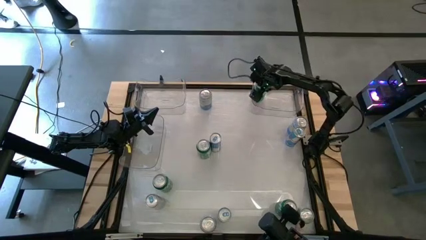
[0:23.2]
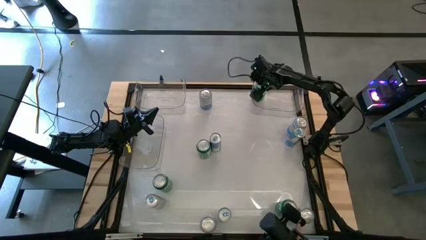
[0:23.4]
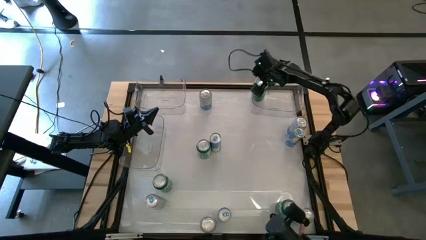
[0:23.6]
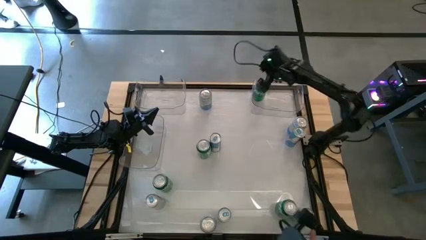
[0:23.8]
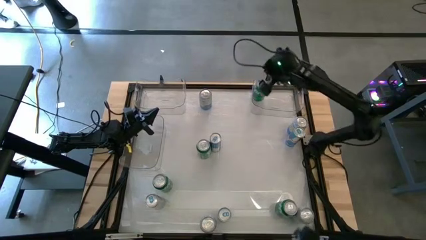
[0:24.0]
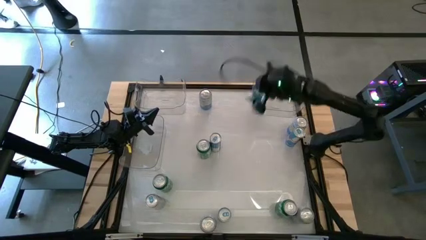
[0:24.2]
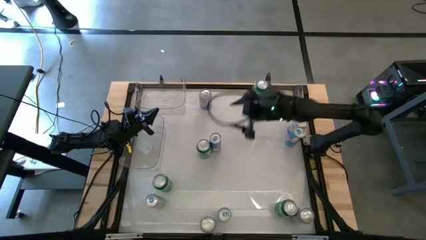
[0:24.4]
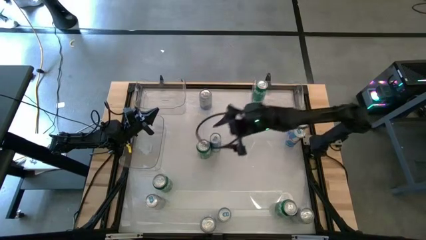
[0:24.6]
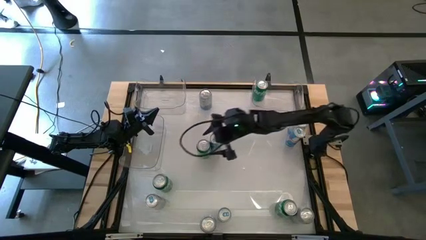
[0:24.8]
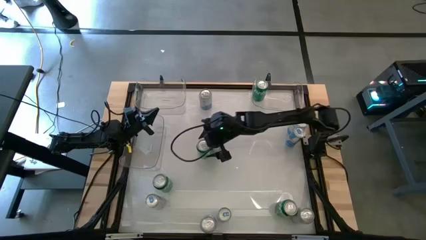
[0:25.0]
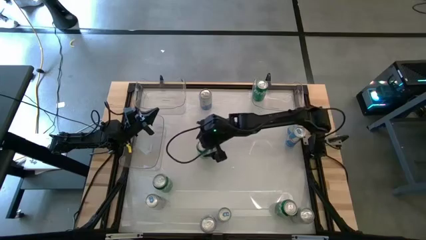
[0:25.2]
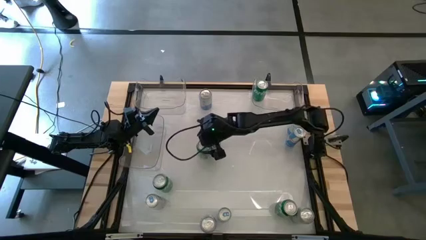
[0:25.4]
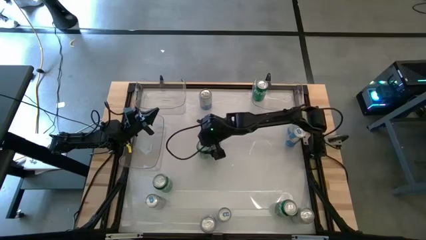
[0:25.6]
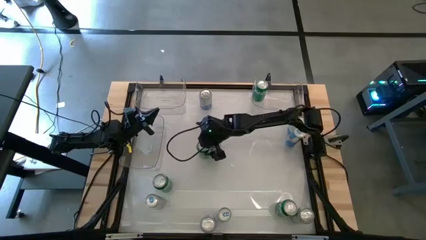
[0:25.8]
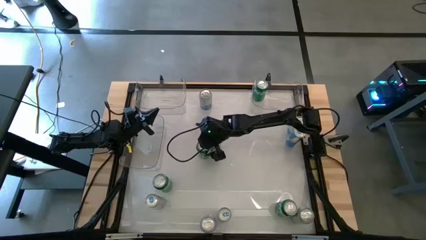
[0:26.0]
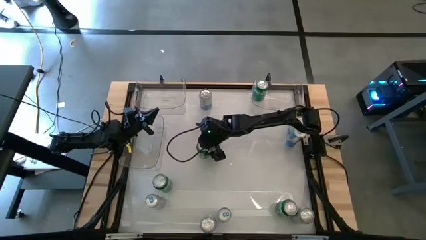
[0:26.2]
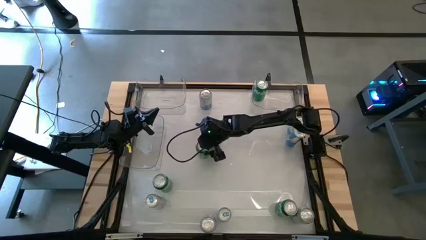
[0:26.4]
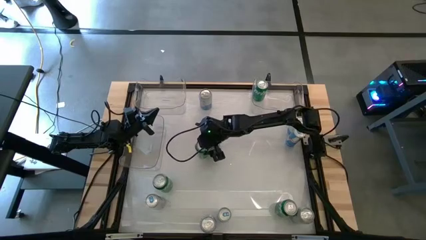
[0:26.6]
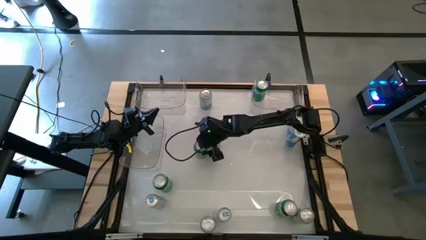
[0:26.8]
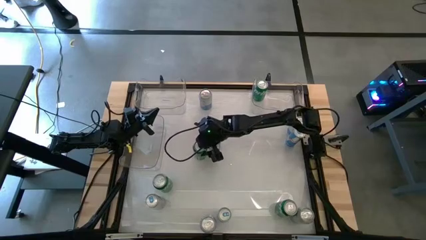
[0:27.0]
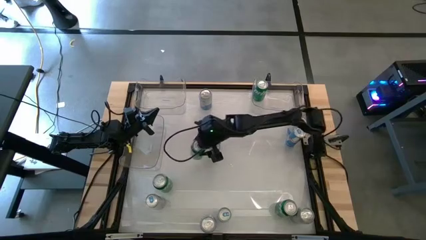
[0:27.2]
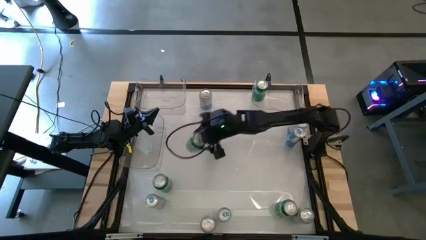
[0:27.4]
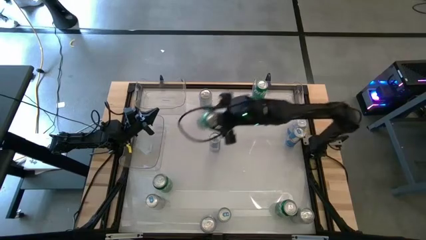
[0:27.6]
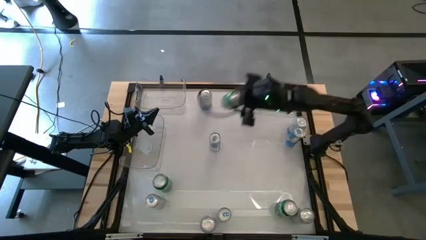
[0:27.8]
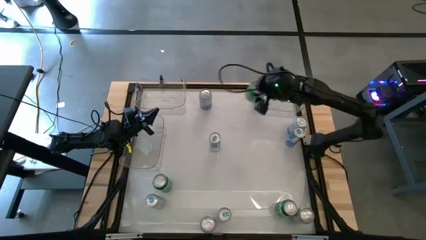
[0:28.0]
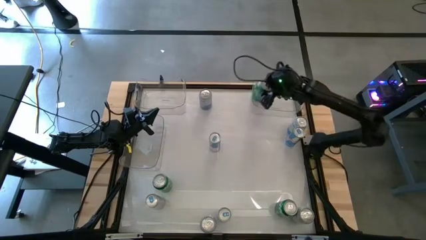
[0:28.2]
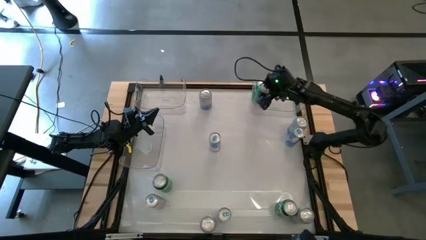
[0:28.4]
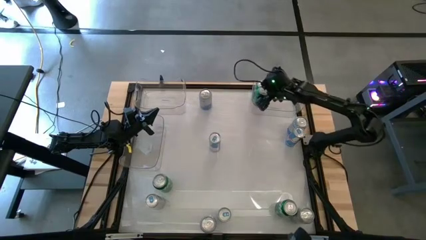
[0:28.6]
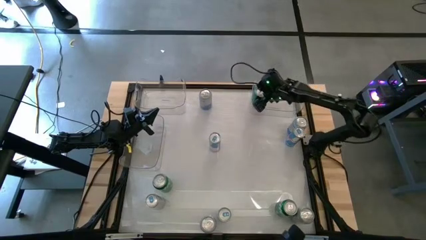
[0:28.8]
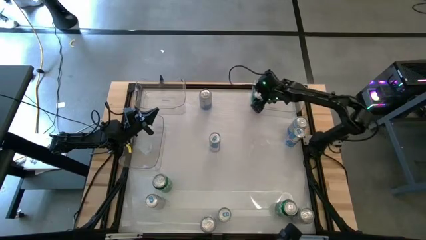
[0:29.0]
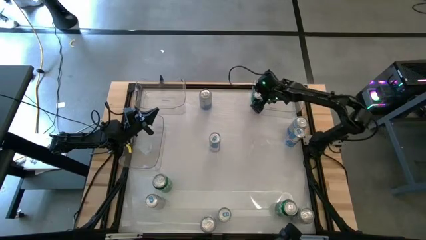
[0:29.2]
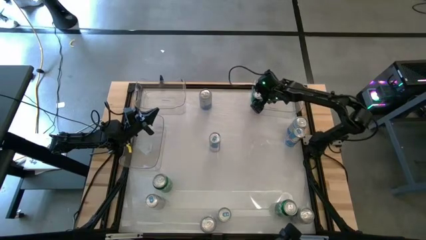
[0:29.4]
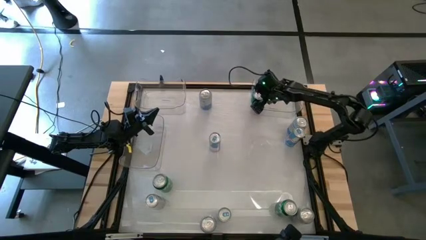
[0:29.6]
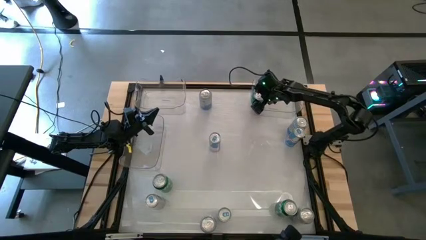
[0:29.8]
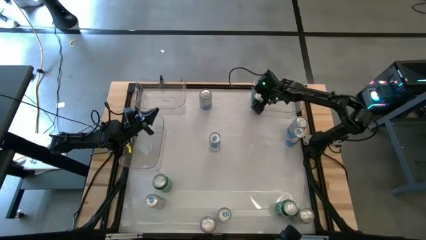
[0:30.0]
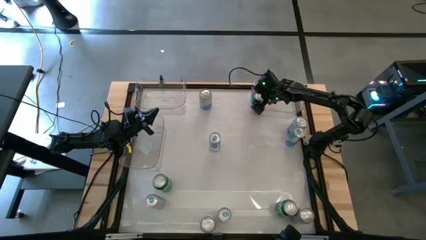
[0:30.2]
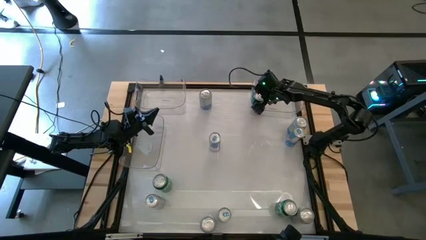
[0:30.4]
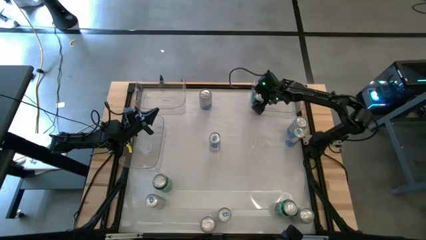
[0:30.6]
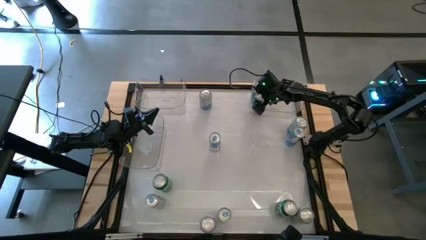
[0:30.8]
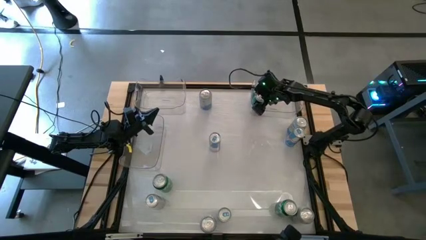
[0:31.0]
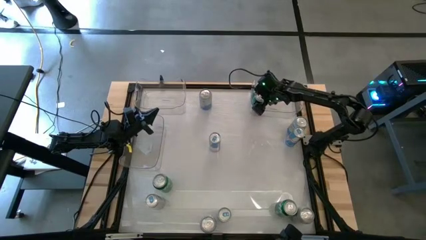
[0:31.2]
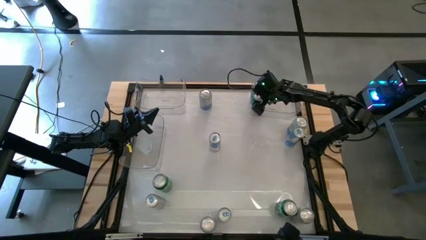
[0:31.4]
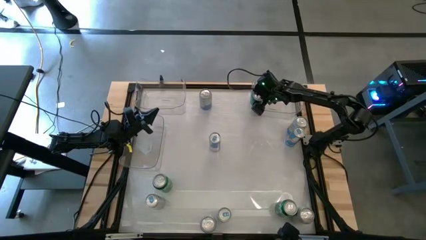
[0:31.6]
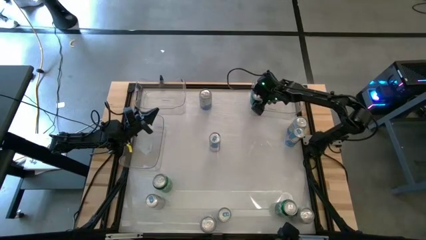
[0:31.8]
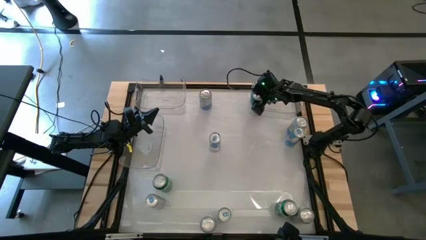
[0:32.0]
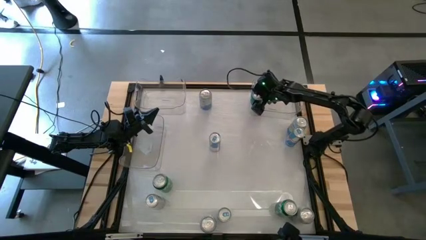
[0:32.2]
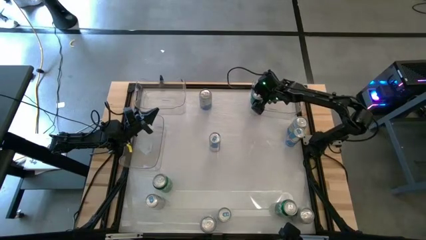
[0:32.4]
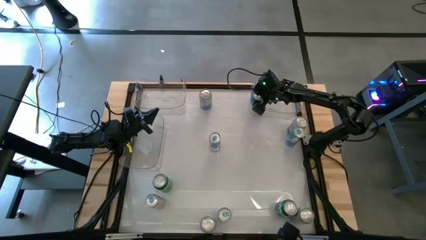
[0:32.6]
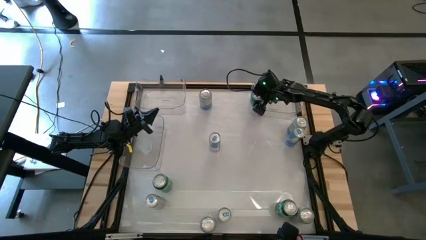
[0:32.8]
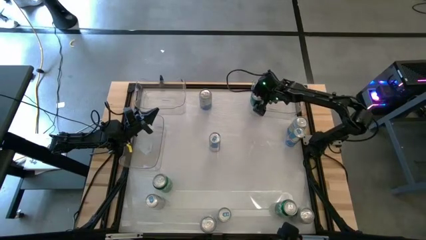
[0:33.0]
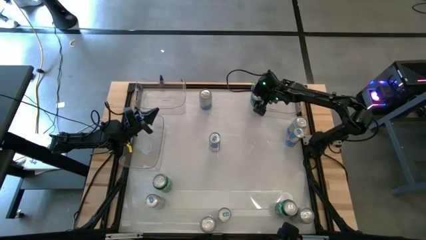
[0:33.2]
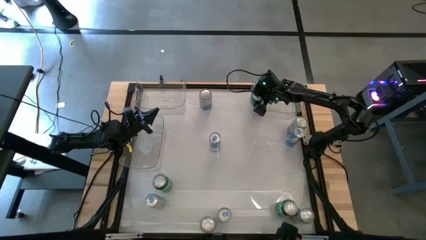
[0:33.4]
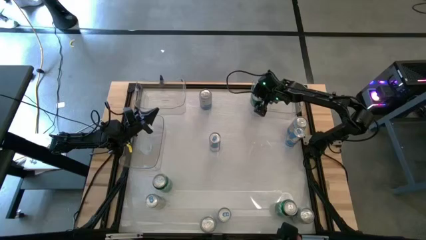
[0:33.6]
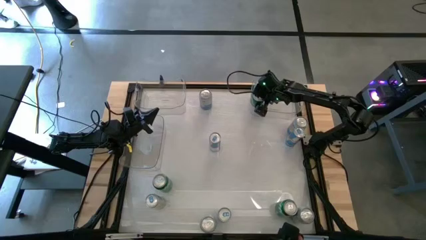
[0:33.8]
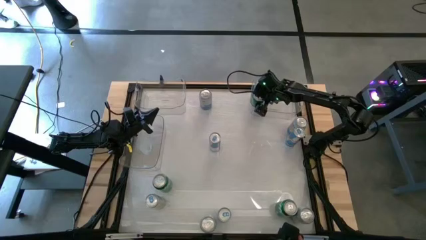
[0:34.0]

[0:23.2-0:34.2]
Task: Sort soda cans
Put the center green soda can into the top right transparent bin

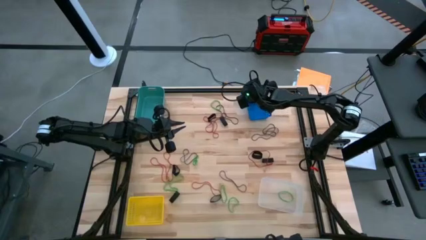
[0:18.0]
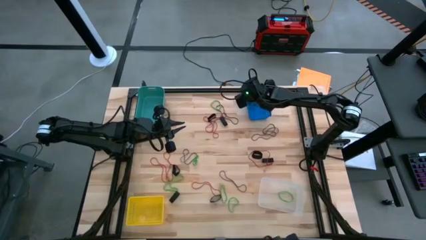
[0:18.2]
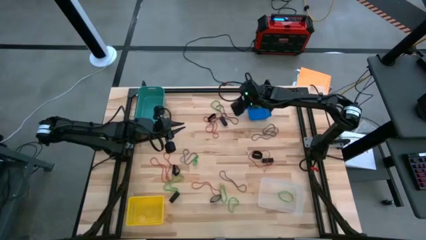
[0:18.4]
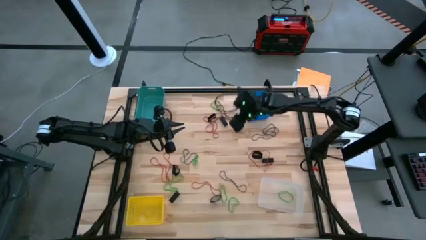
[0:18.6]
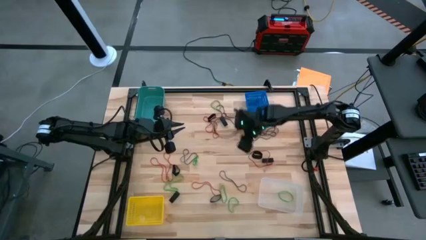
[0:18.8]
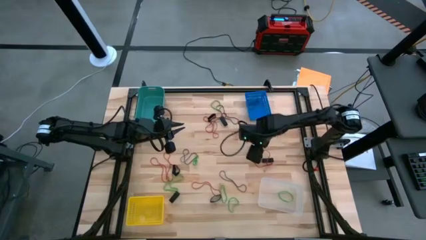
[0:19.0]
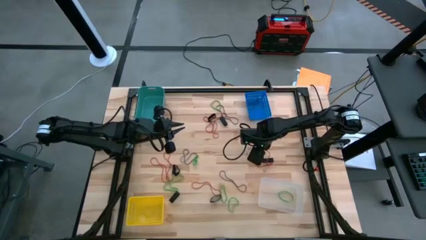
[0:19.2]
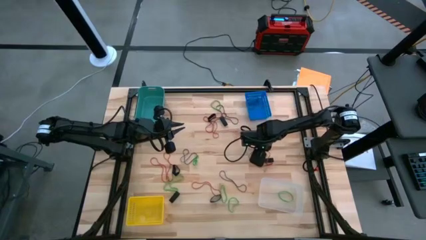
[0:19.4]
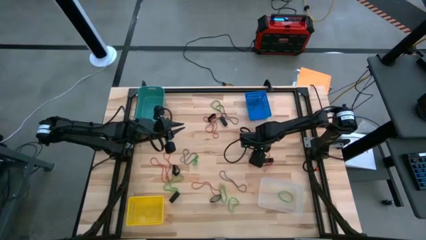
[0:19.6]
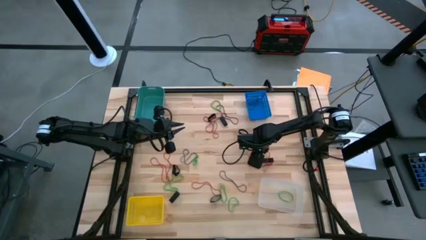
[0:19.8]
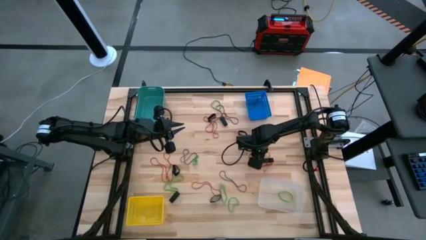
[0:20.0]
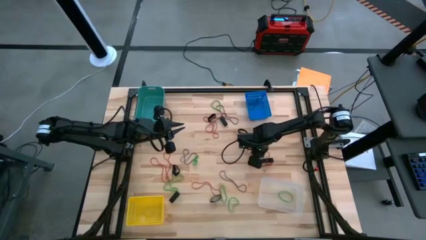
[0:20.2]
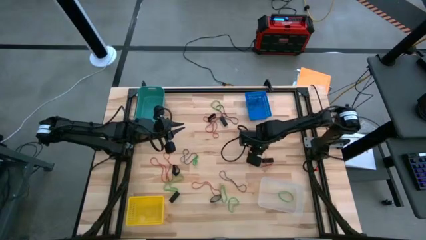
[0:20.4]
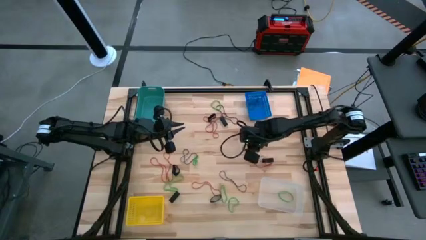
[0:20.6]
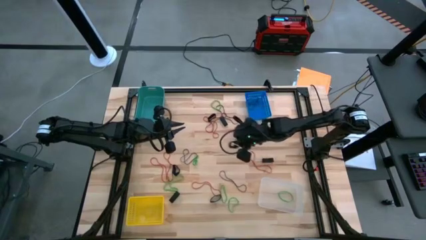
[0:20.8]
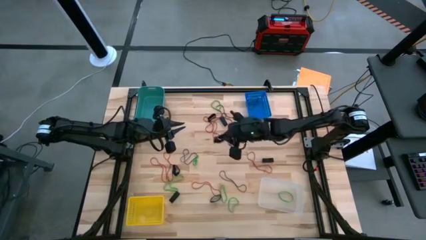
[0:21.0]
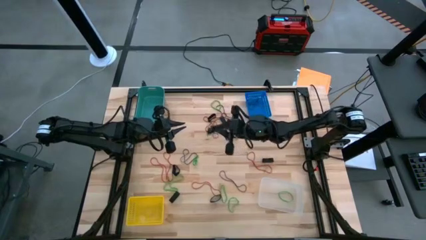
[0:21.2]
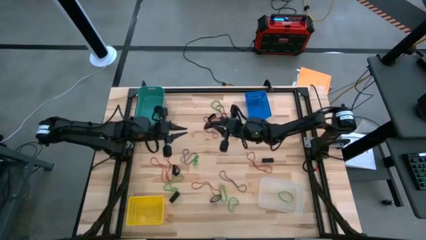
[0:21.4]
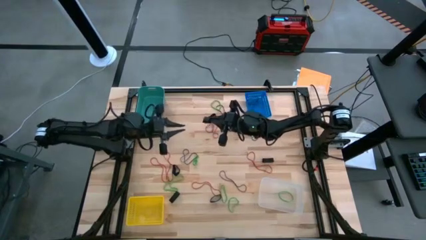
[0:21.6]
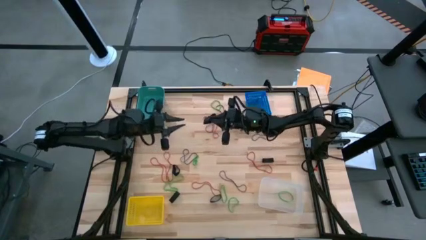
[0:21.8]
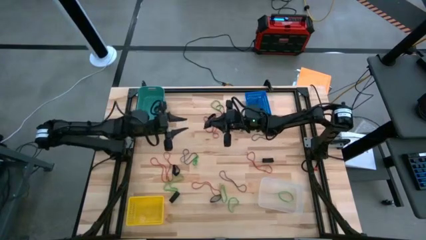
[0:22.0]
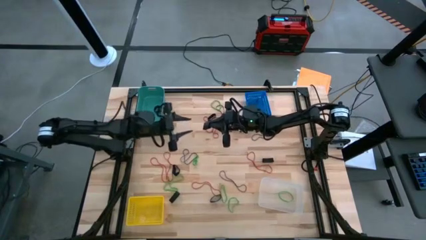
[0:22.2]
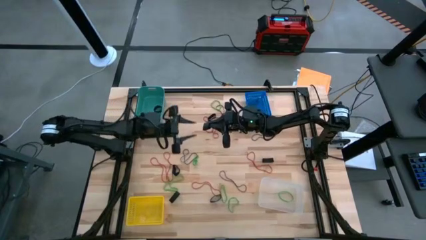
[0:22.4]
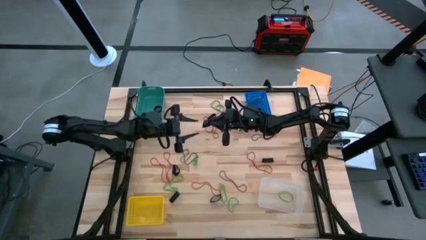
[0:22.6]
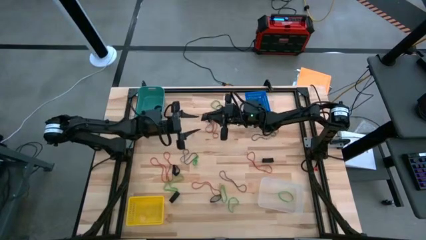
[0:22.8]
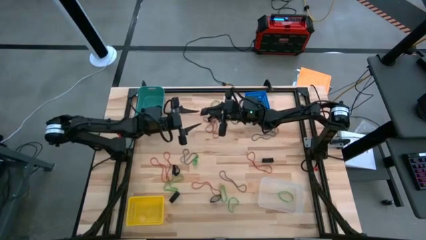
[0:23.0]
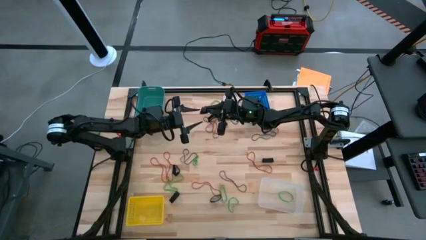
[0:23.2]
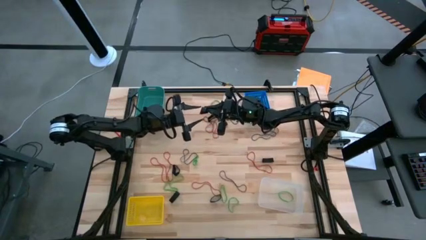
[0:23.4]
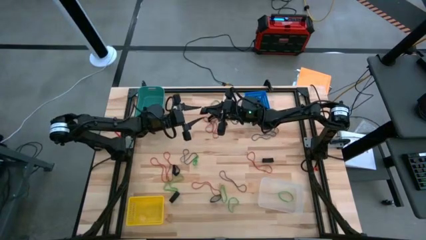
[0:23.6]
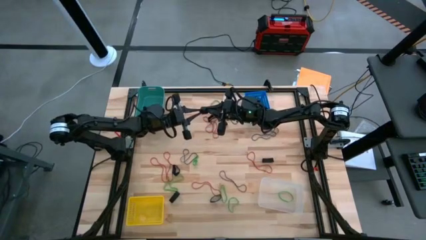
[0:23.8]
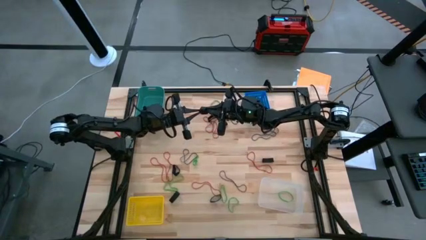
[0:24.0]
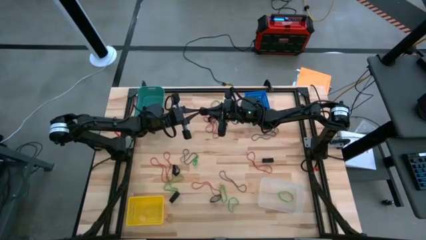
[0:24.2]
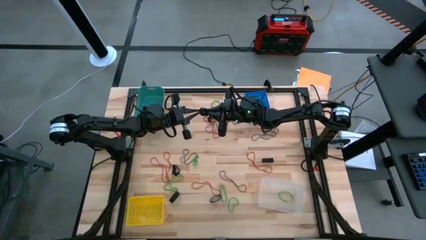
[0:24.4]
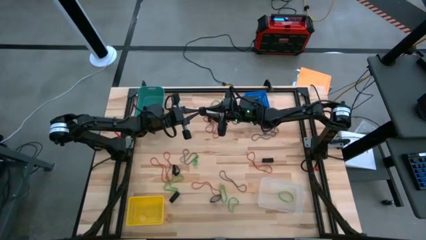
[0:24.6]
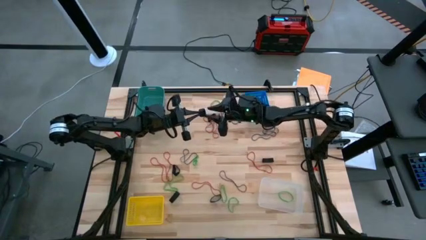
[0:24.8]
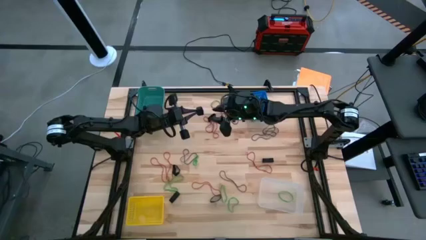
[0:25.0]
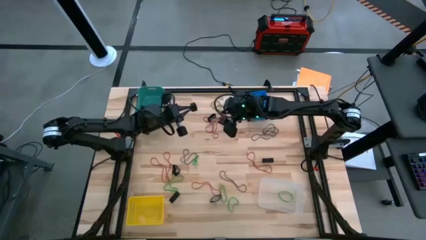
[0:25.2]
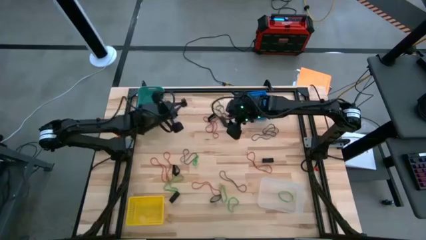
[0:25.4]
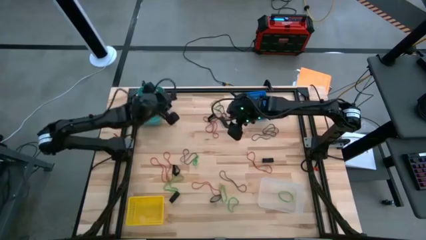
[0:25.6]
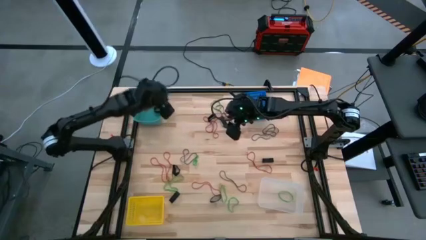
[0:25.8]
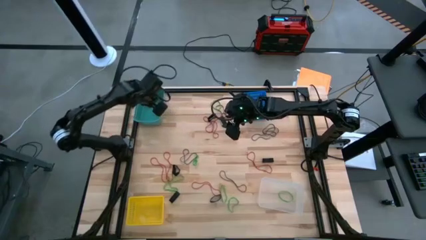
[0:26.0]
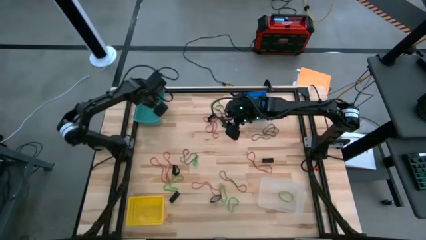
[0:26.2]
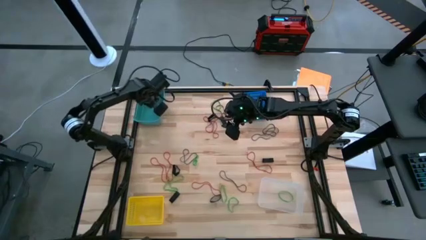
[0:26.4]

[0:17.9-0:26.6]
Task: Sort rubber bands into baskets
Put the thick black rubber band into the light blue bin
